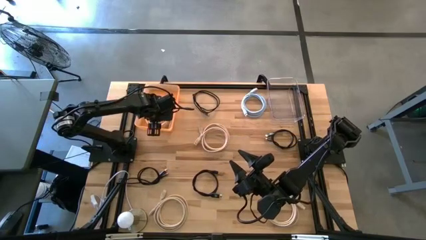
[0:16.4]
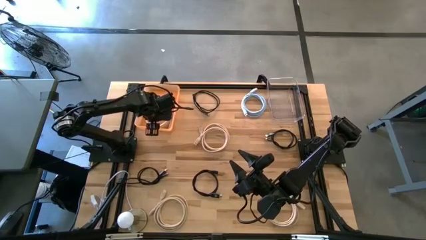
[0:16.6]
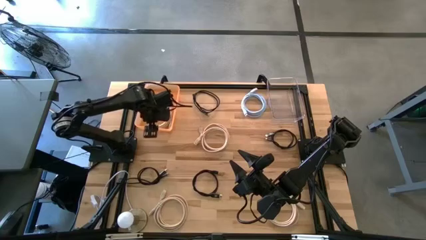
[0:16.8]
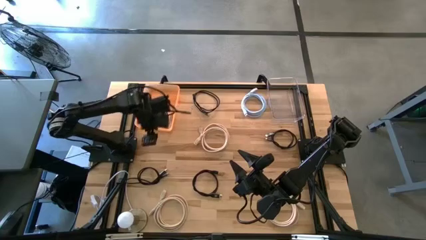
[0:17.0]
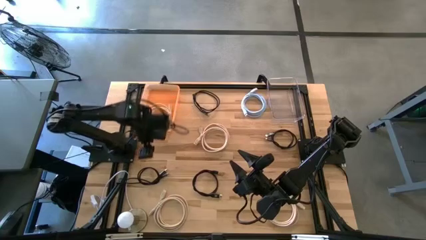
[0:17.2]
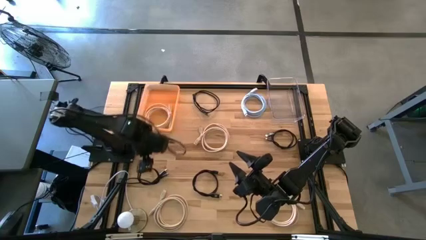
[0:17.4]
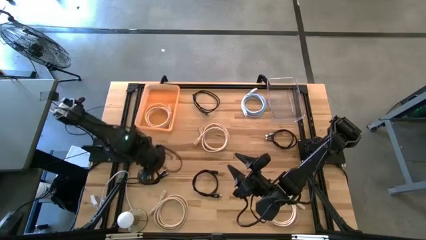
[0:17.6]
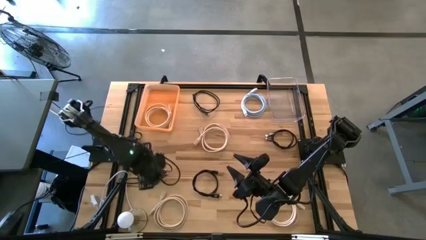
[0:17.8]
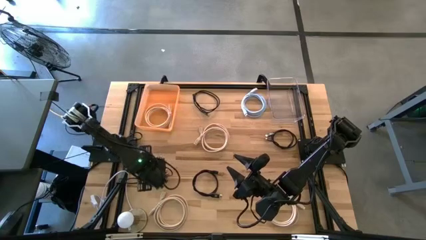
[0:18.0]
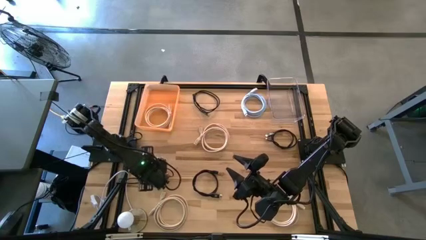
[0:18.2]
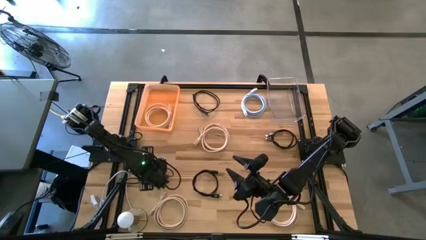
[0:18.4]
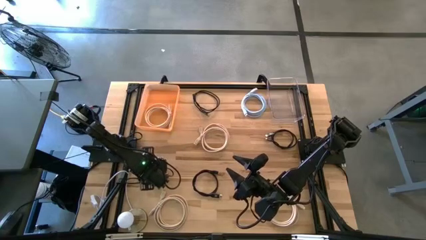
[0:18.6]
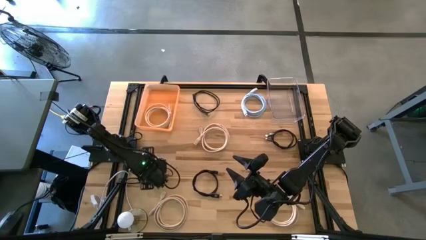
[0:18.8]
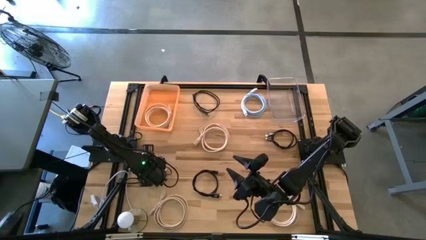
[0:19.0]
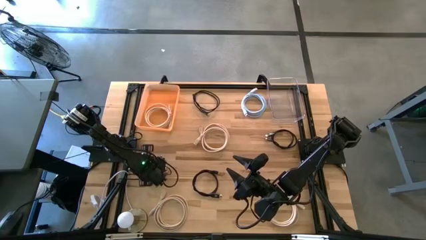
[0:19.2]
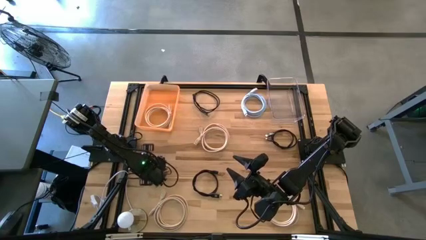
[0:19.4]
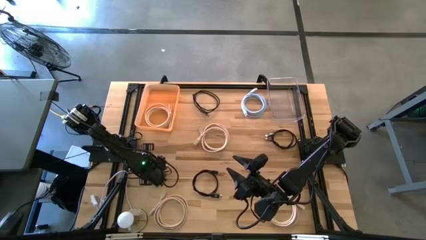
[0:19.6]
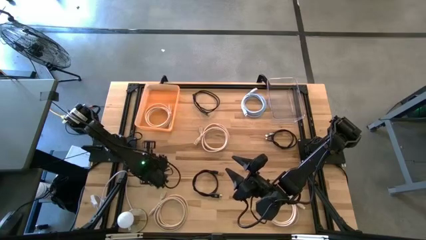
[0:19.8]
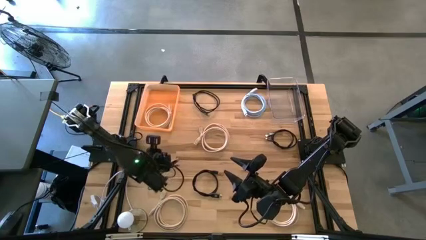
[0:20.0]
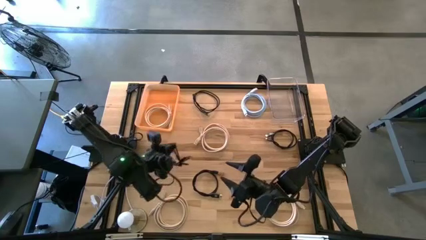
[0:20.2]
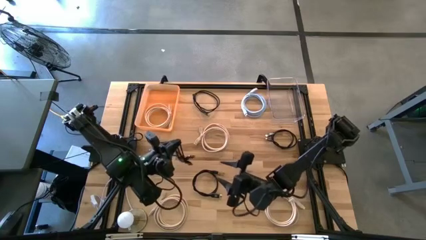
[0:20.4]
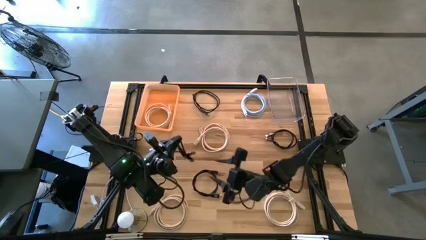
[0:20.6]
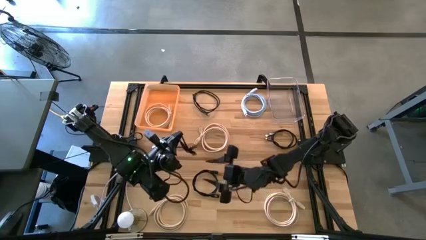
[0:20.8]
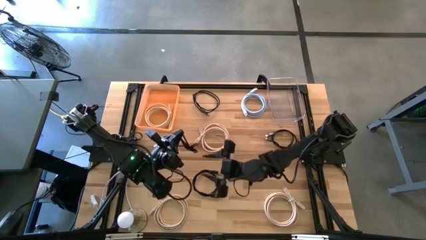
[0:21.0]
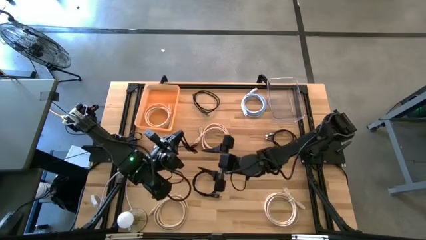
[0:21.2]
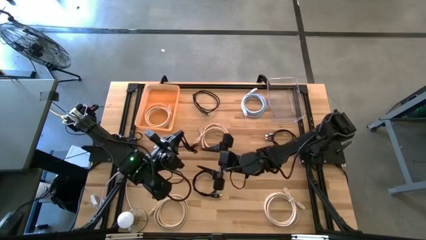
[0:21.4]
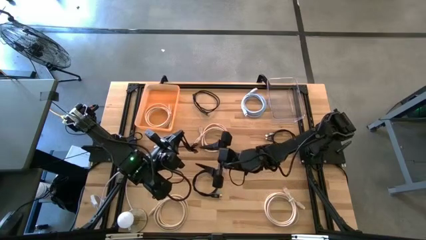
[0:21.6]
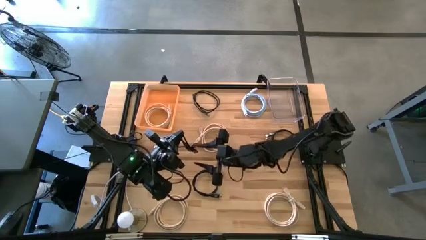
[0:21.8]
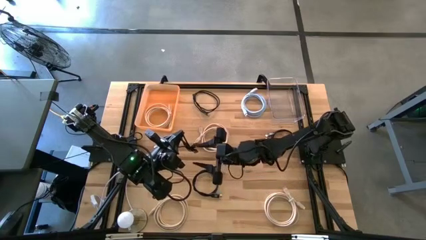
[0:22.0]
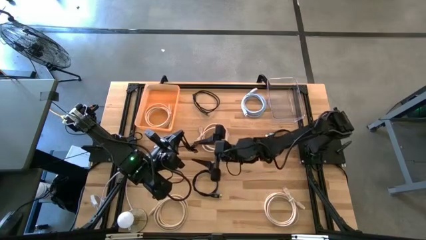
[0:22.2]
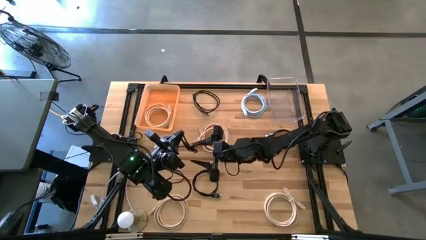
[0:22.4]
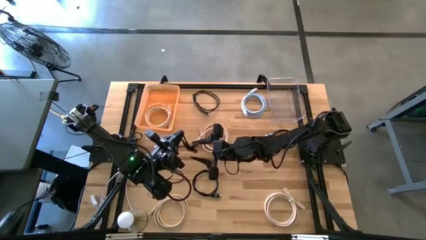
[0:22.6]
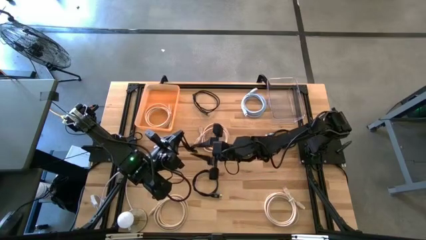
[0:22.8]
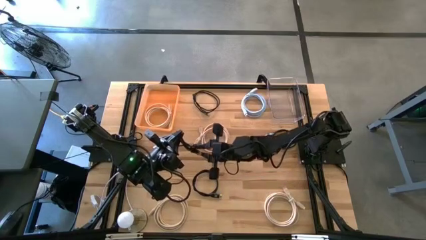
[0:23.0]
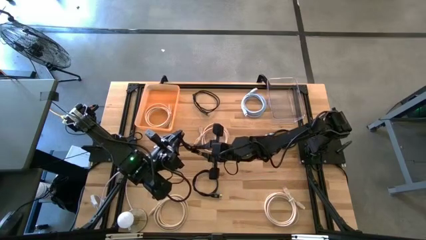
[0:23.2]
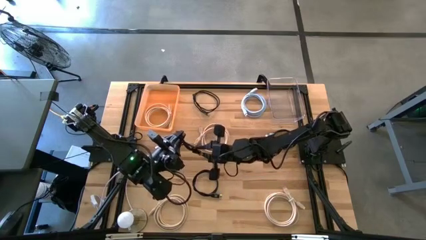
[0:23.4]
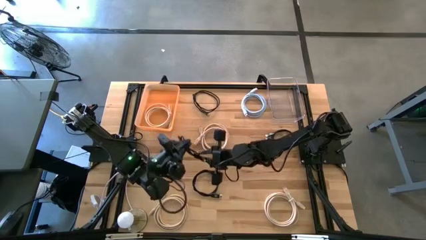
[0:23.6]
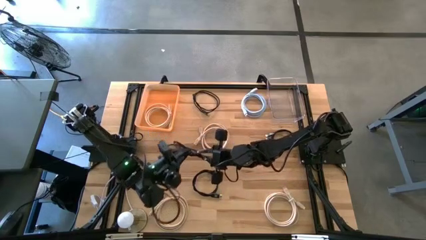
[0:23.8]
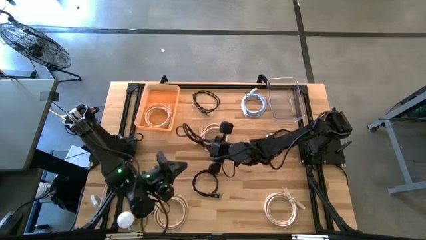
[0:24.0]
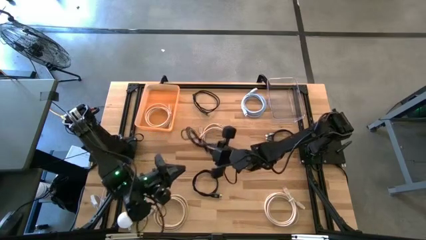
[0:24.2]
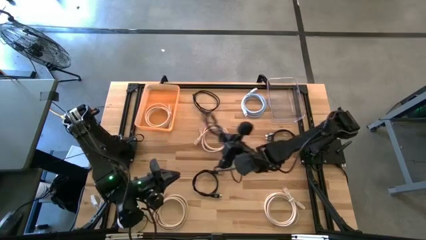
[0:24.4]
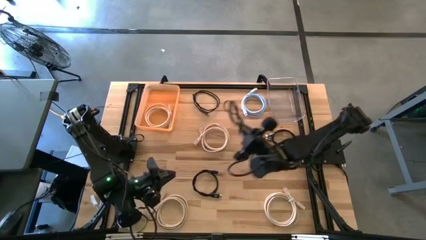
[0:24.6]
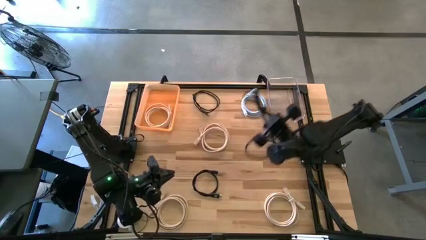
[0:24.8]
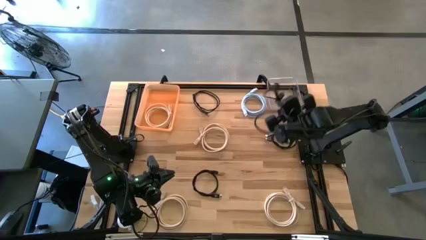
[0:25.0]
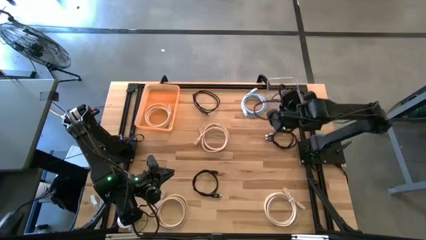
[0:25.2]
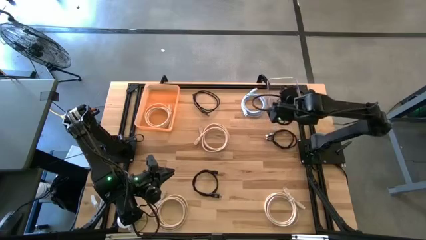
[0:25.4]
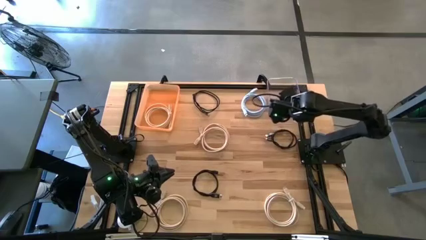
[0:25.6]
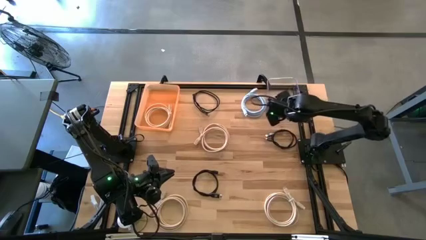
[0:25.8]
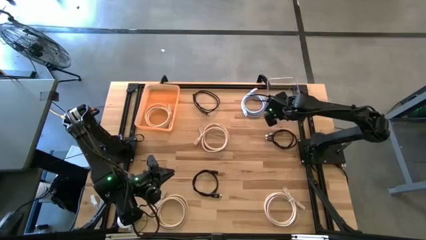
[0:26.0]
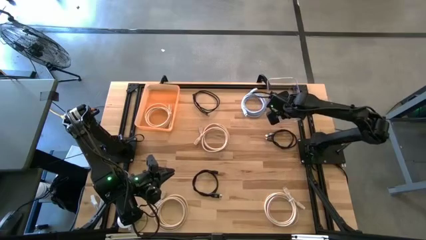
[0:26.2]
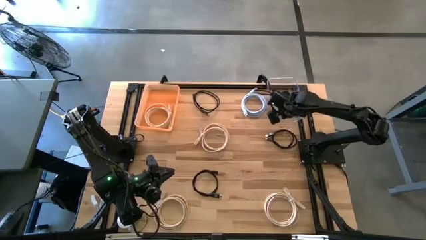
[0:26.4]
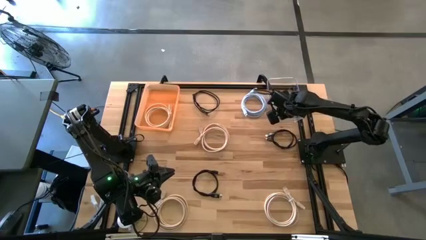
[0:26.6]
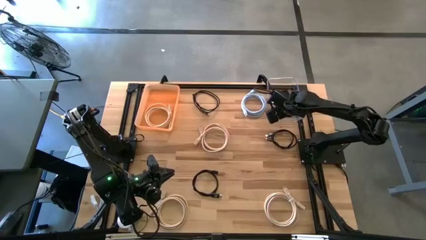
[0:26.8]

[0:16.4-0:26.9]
Task: Sort HDMI cables
Put the black HDMI cable into the transparent bin
